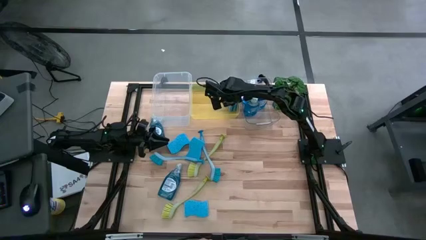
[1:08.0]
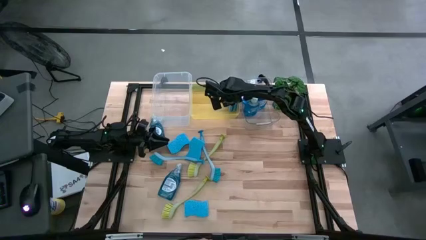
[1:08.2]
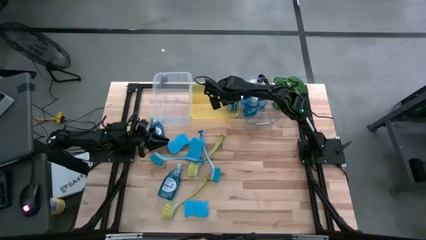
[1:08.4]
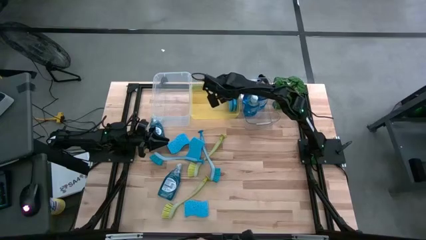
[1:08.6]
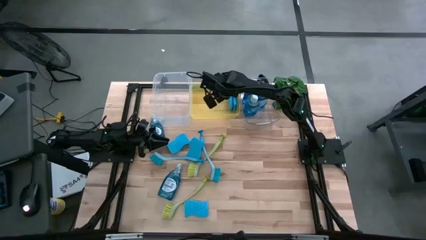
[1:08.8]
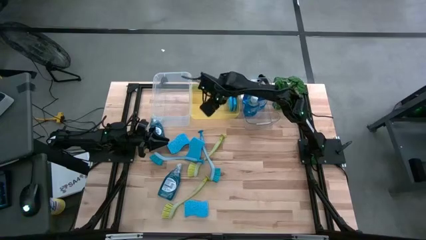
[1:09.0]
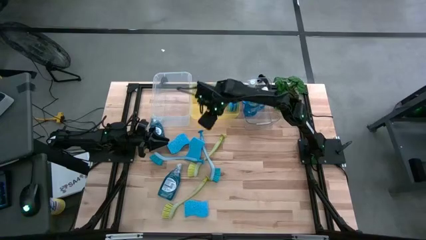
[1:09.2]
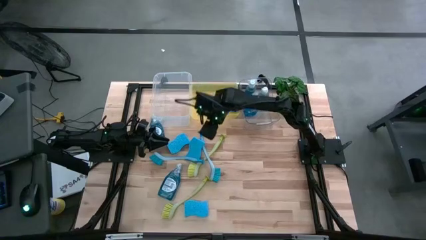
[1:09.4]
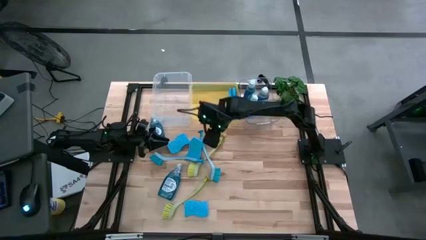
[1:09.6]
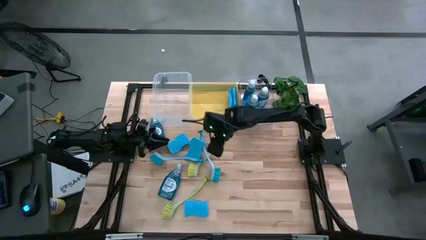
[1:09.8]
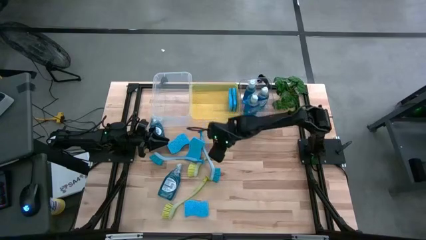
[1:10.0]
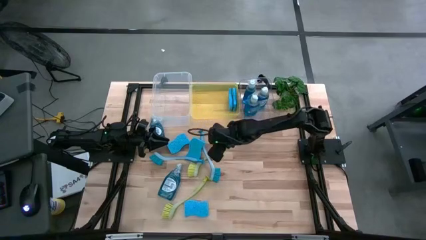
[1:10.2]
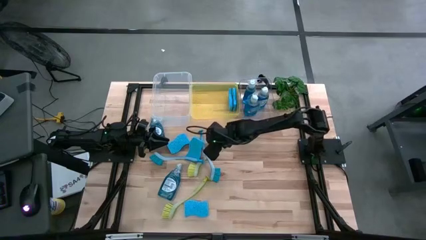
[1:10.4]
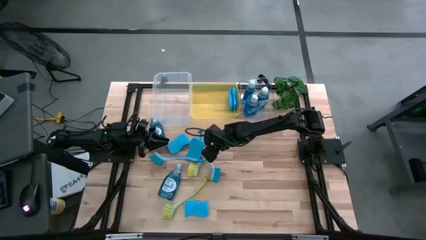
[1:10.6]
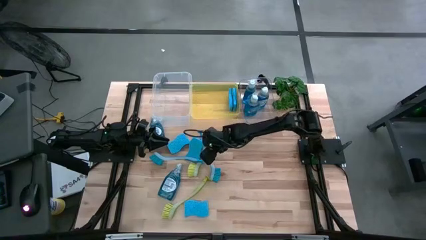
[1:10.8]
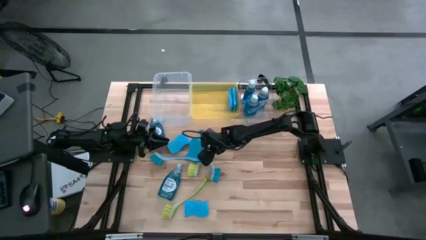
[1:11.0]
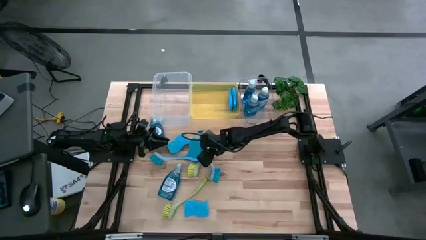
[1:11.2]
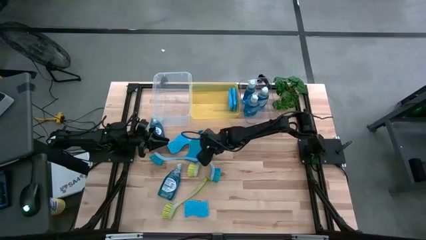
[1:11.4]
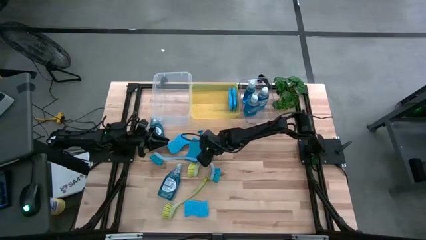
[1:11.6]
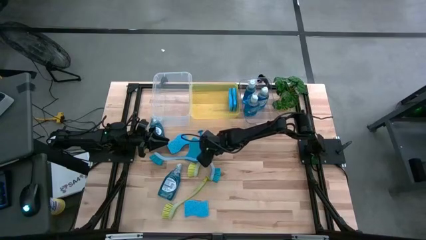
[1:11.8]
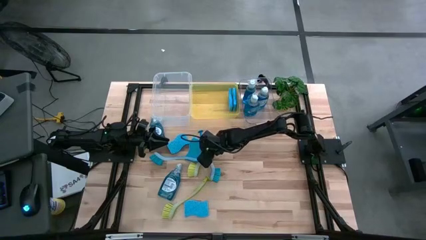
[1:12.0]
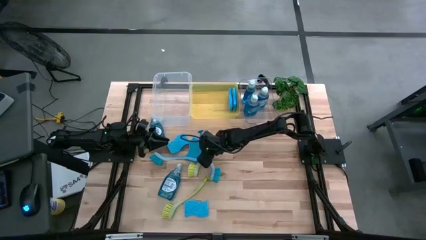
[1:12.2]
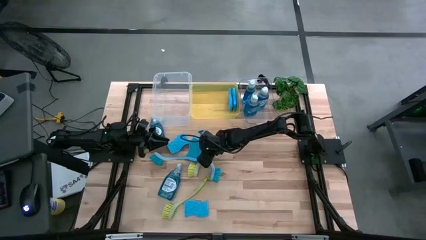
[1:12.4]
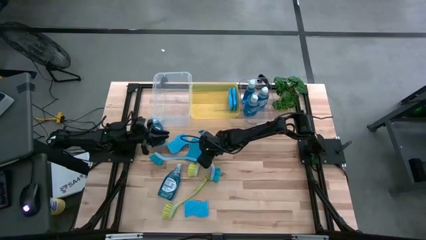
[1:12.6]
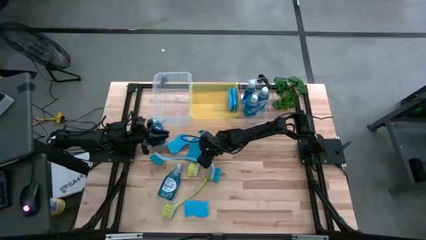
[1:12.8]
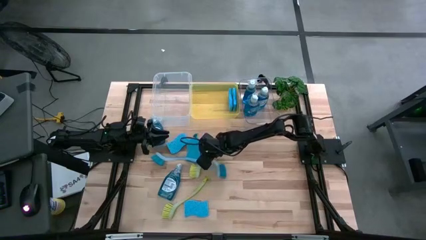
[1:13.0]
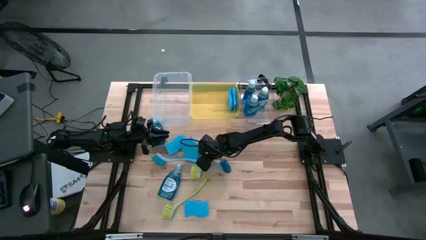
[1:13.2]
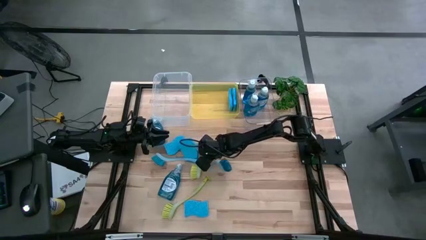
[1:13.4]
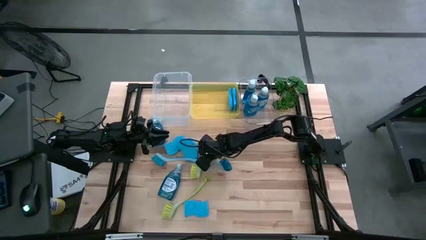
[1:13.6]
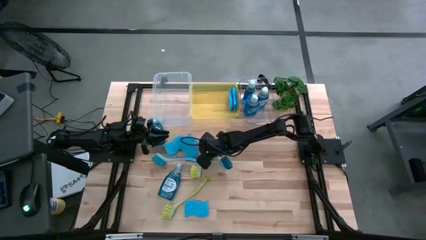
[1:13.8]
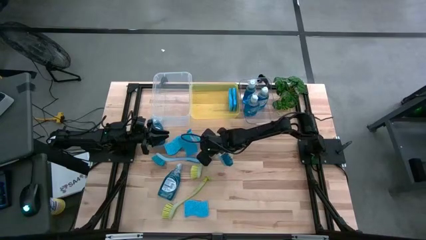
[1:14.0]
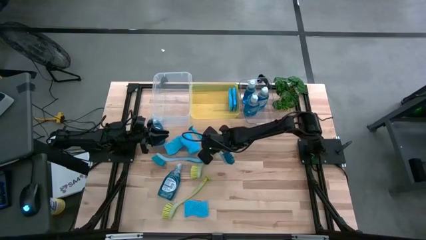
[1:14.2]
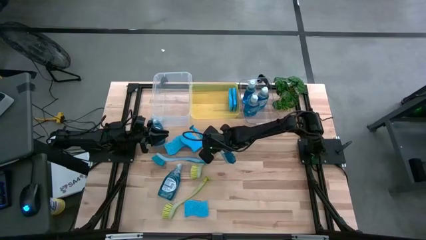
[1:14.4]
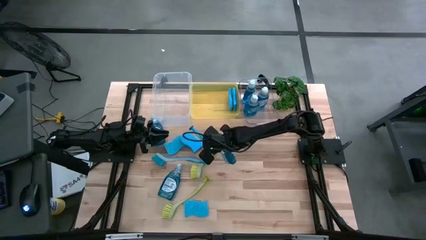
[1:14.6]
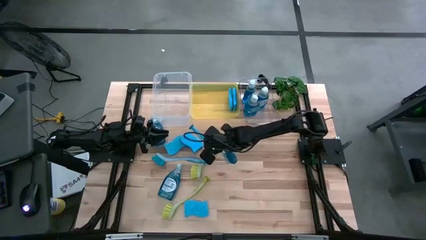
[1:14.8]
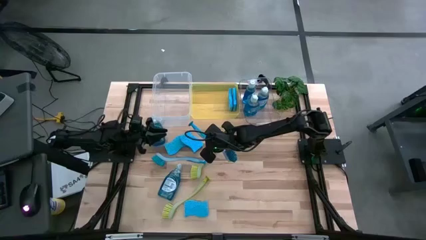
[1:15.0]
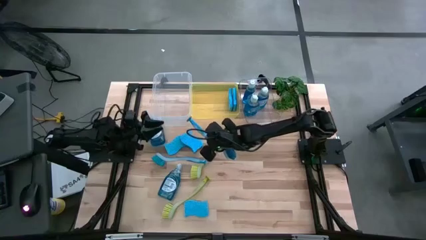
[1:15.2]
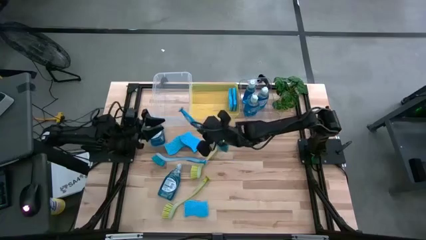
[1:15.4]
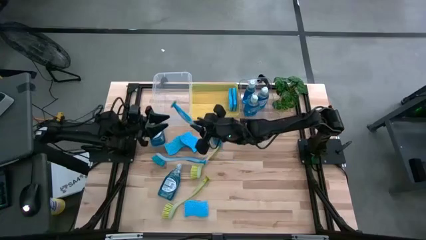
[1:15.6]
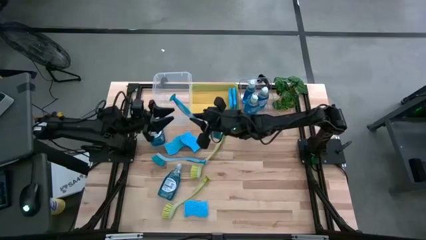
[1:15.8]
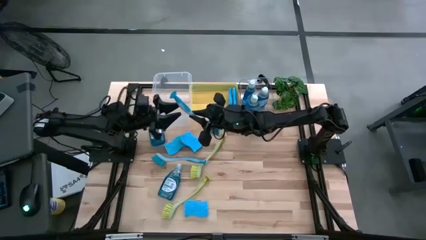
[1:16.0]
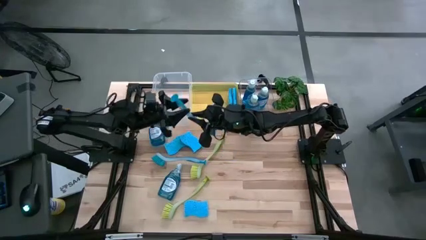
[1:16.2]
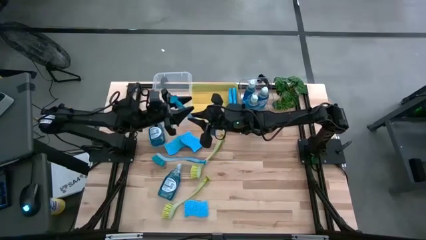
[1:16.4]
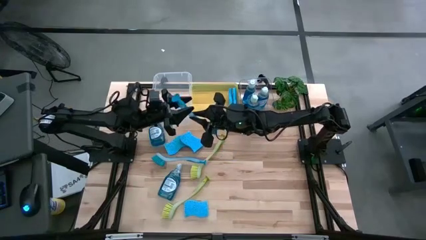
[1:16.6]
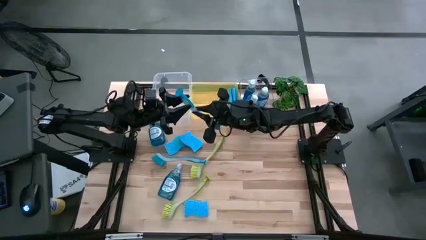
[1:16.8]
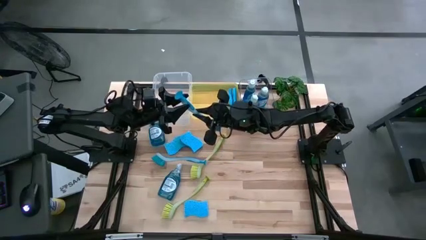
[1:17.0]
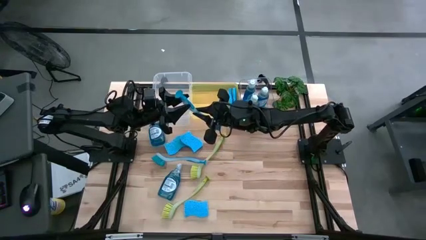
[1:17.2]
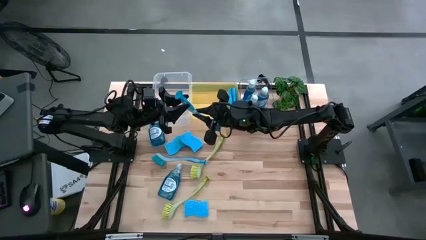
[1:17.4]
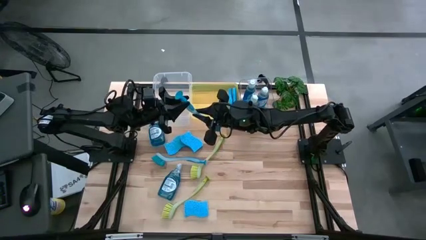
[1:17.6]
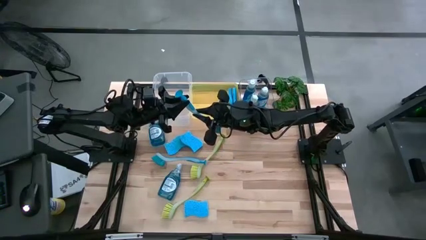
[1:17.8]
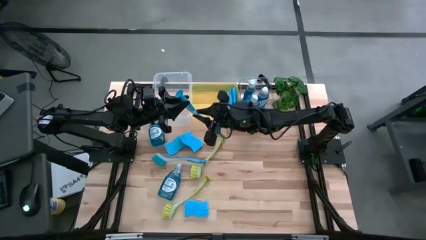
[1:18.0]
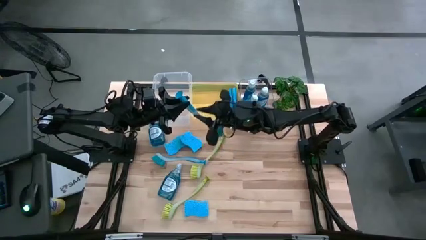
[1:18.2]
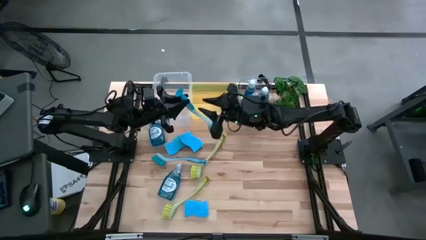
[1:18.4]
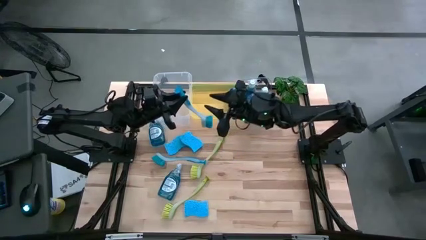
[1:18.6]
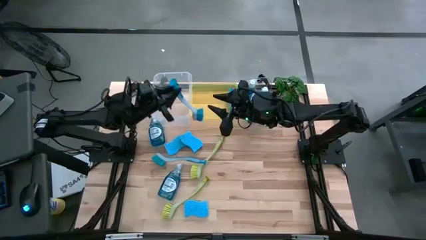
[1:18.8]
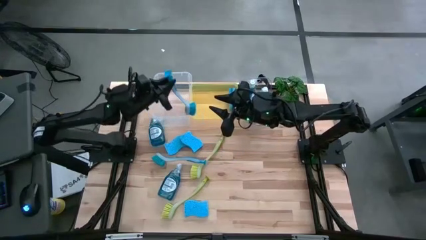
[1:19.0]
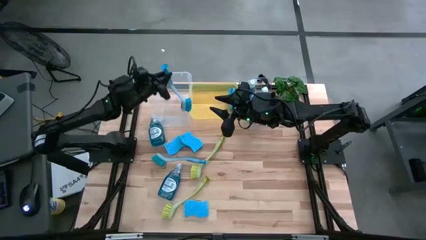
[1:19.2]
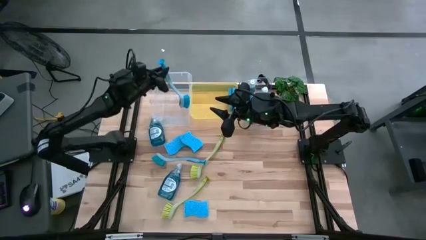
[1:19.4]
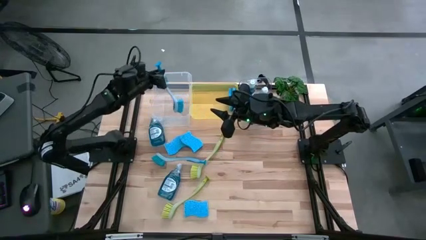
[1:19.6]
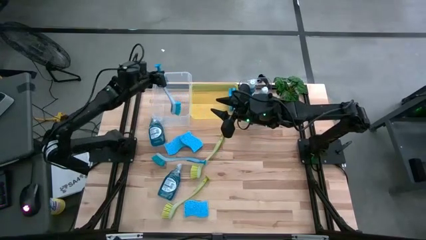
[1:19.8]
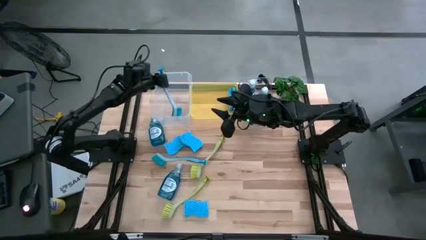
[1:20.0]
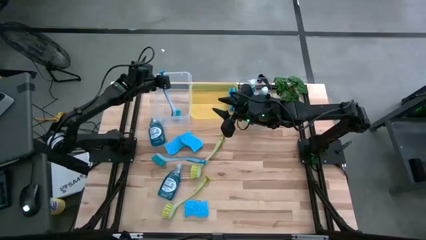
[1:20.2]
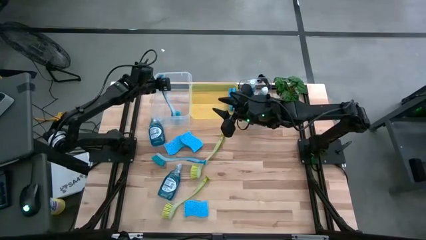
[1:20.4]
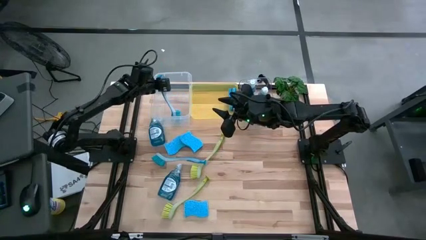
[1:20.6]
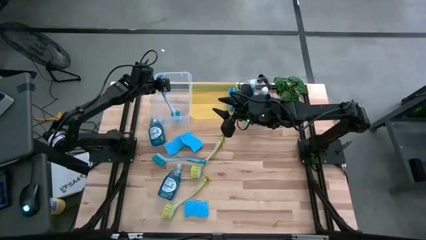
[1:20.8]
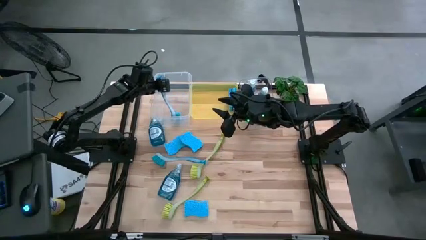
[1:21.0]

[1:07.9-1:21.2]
Task: Pick & Place Kitchen Sink Supplies
Put the blue dish brush into the white bin

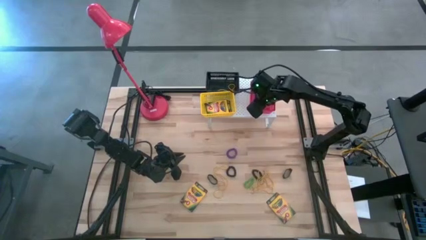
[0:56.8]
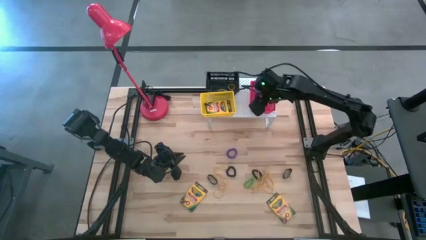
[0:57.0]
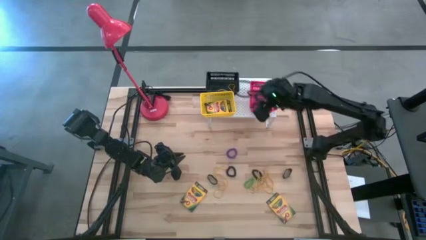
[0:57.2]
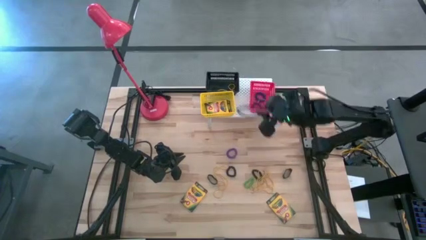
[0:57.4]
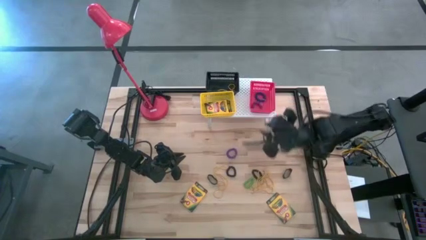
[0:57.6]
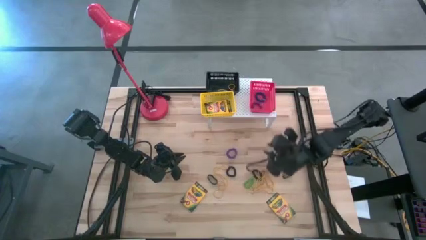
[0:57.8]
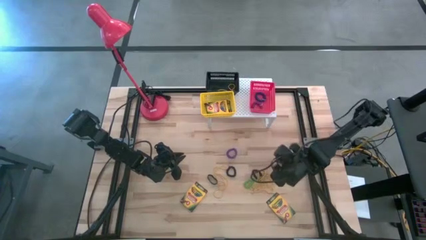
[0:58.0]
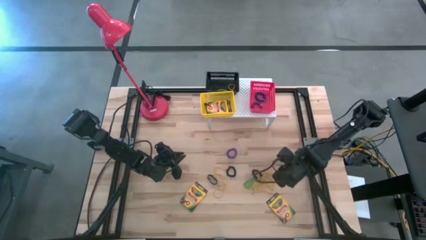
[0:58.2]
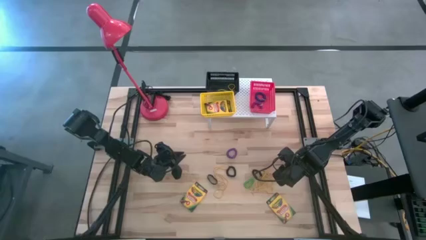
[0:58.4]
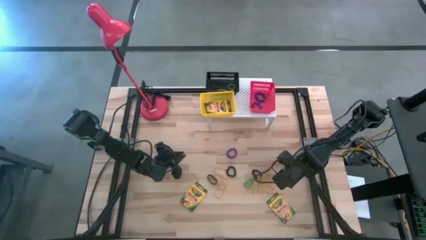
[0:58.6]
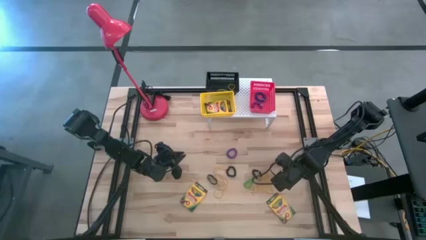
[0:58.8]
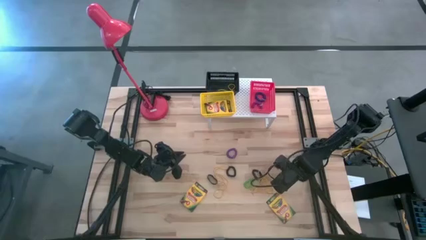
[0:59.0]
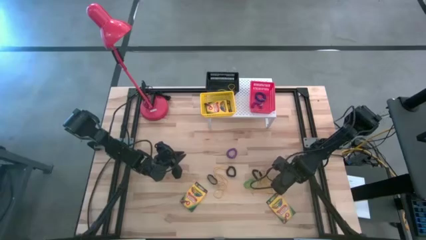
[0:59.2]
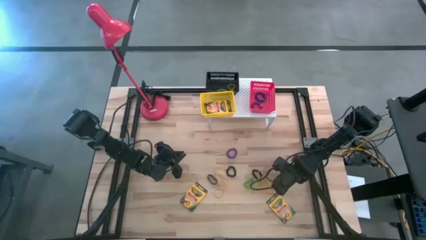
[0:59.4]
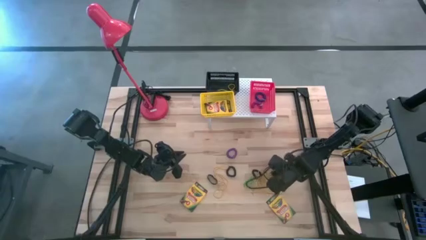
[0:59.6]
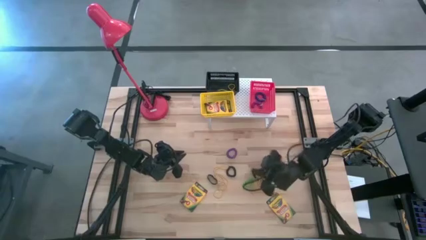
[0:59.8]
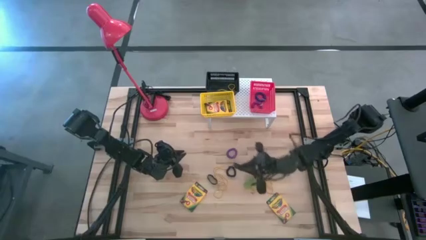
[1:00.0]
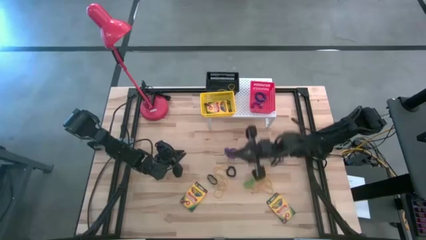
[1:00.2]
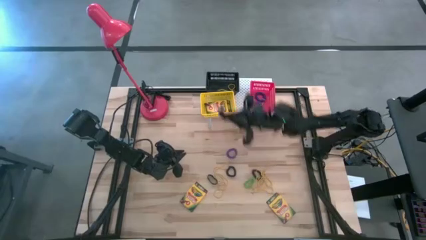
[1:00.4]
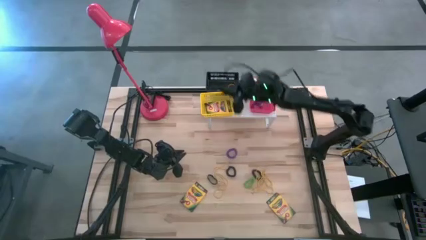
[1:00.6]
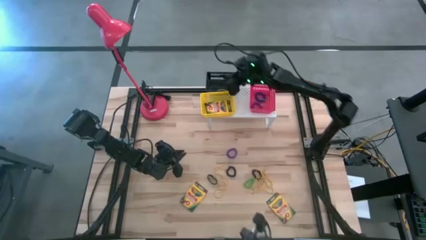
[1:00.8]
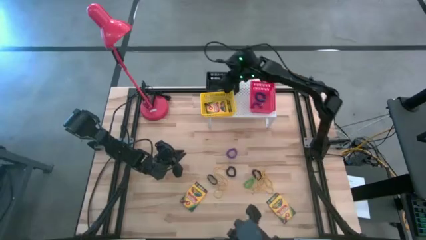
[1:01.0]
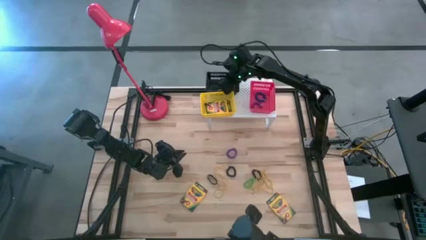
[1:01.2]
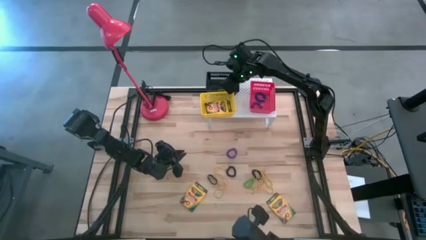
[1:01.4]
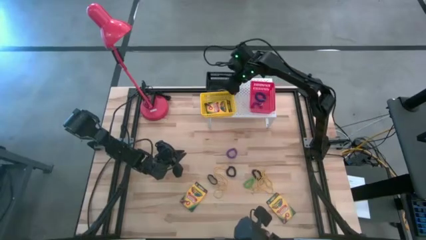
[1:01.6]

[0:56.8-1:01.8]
Task: Pick & Place Office Desk Supplies
Put the black rubber band into the black bin on the shelf
